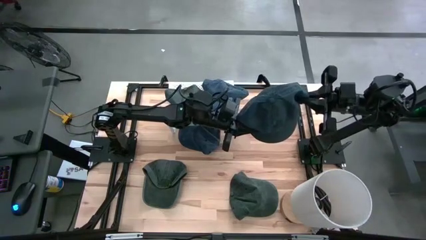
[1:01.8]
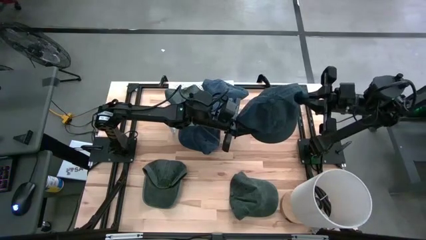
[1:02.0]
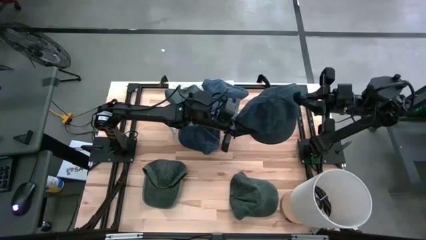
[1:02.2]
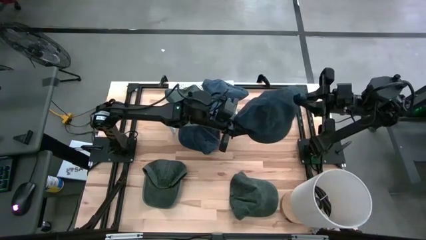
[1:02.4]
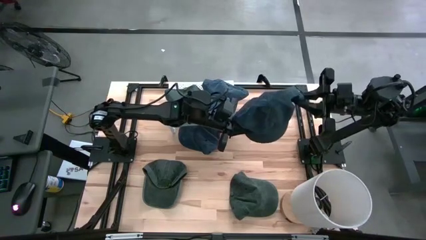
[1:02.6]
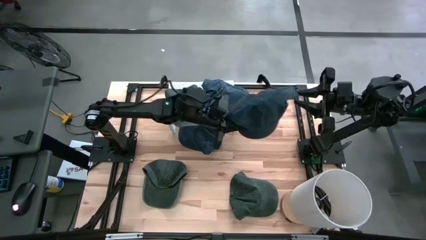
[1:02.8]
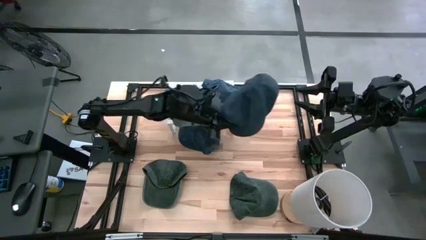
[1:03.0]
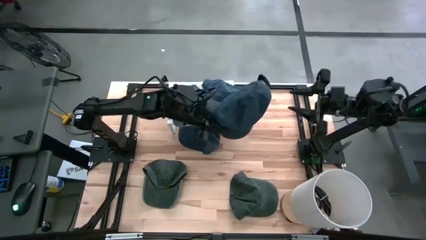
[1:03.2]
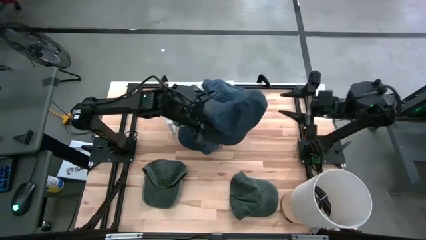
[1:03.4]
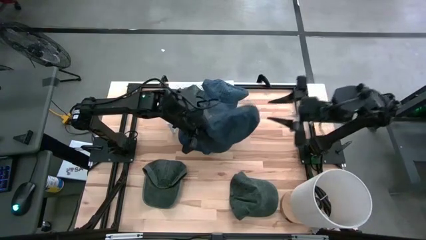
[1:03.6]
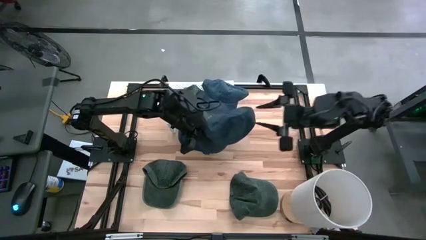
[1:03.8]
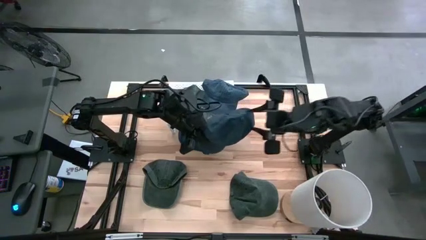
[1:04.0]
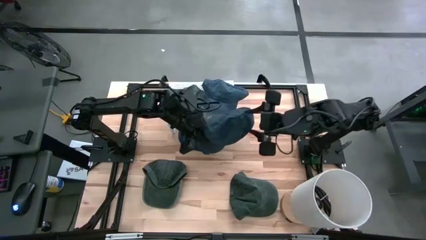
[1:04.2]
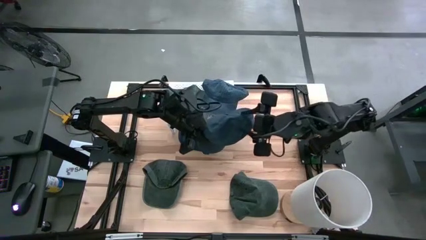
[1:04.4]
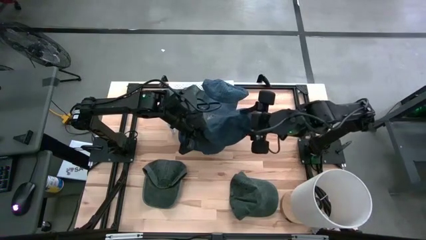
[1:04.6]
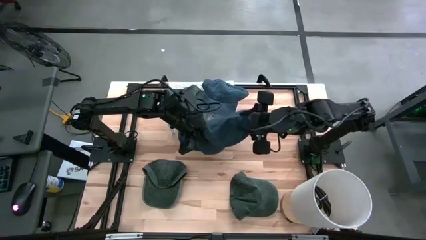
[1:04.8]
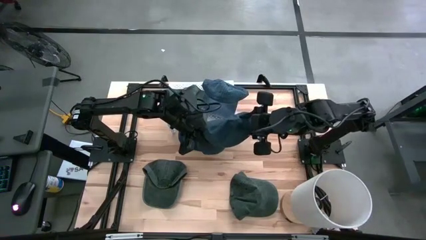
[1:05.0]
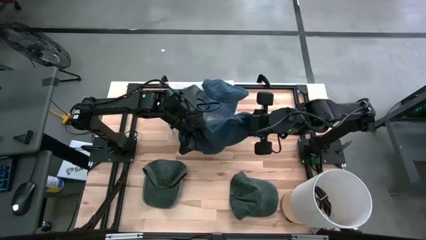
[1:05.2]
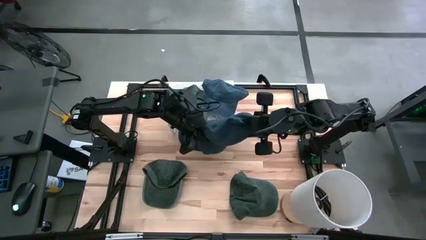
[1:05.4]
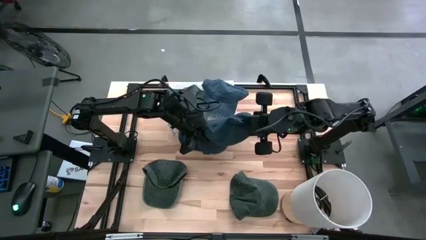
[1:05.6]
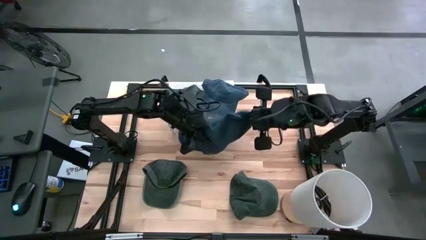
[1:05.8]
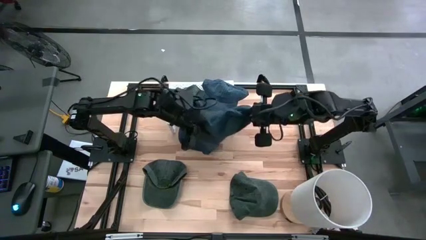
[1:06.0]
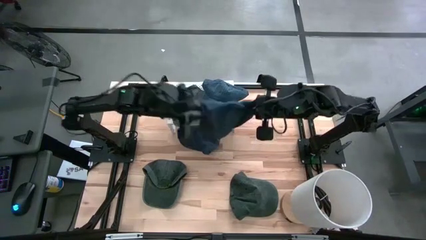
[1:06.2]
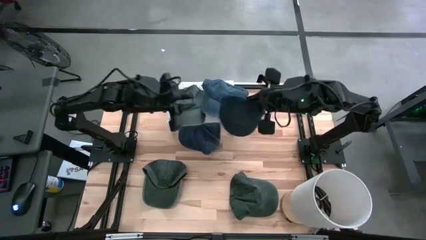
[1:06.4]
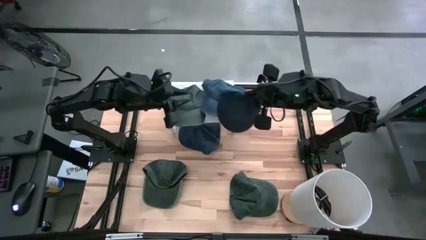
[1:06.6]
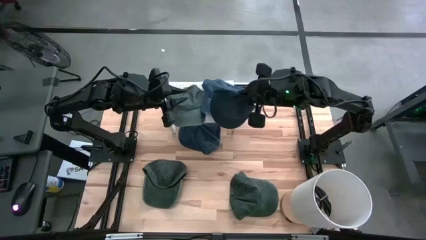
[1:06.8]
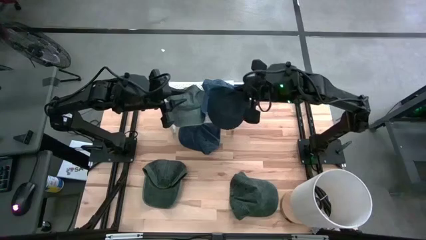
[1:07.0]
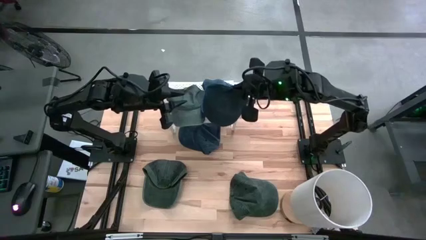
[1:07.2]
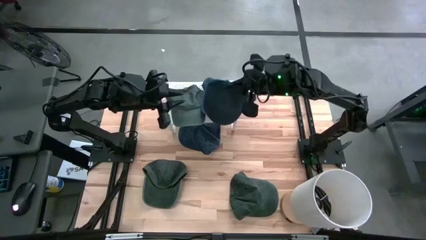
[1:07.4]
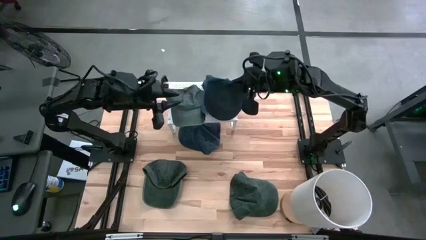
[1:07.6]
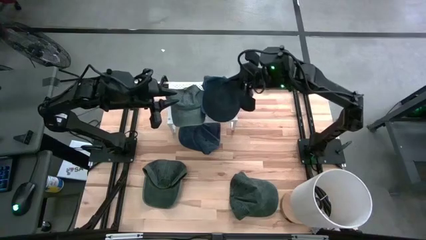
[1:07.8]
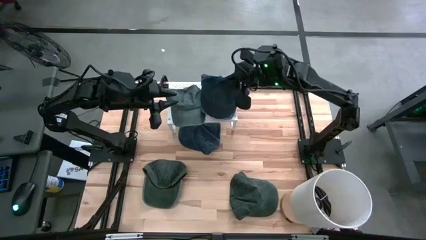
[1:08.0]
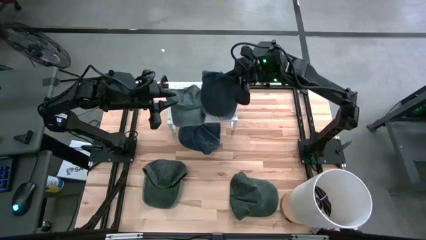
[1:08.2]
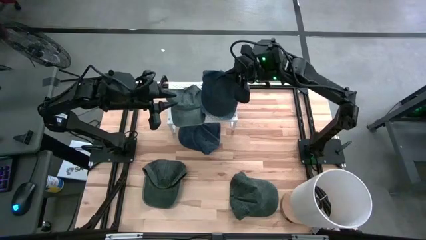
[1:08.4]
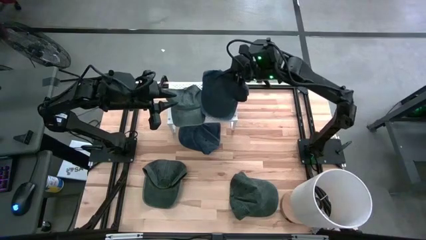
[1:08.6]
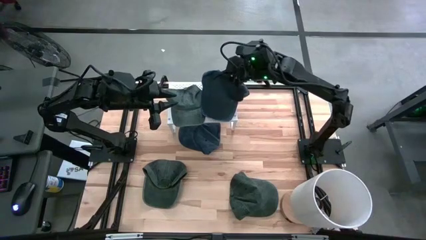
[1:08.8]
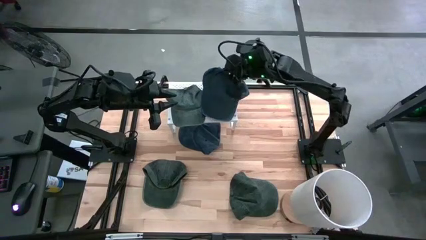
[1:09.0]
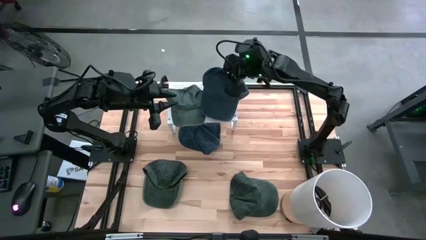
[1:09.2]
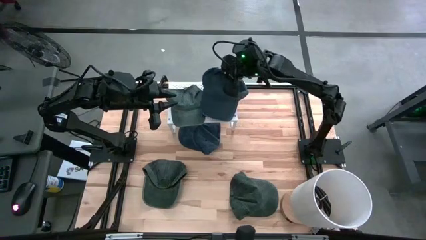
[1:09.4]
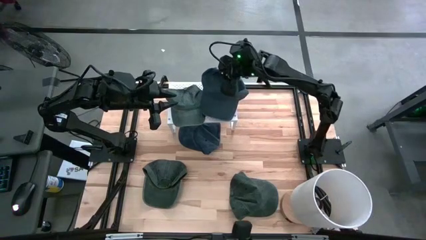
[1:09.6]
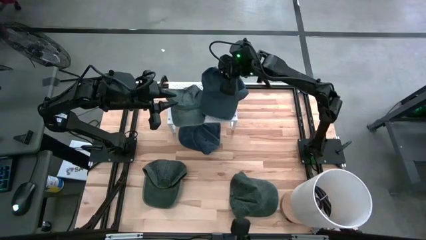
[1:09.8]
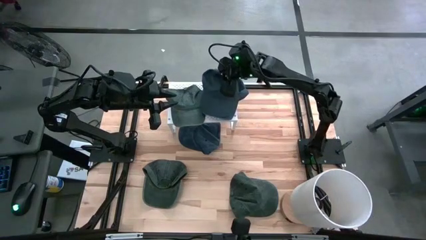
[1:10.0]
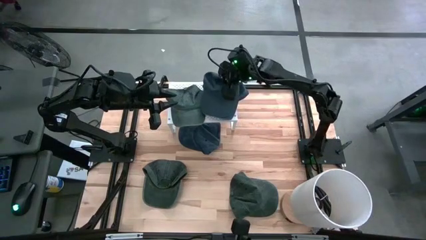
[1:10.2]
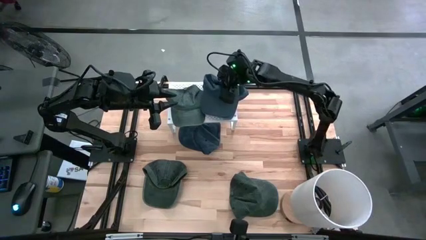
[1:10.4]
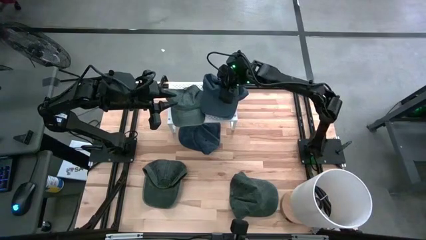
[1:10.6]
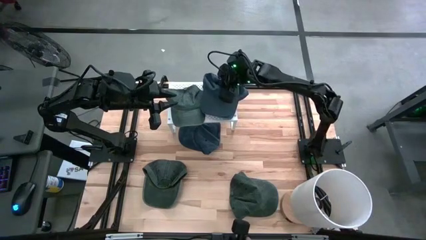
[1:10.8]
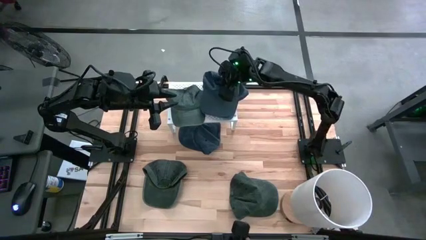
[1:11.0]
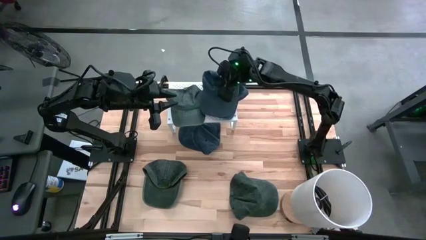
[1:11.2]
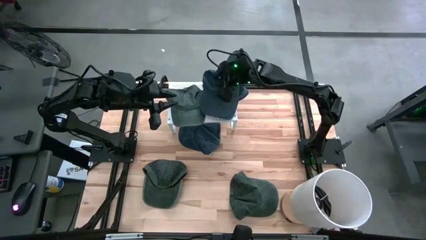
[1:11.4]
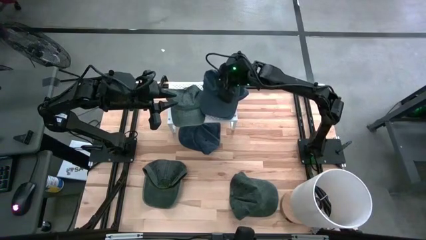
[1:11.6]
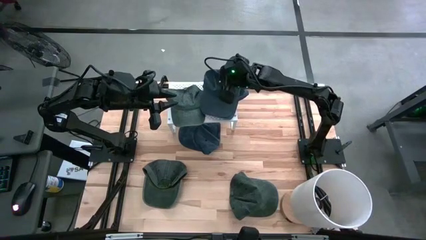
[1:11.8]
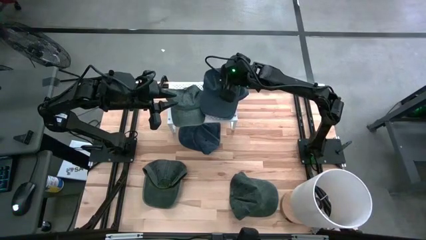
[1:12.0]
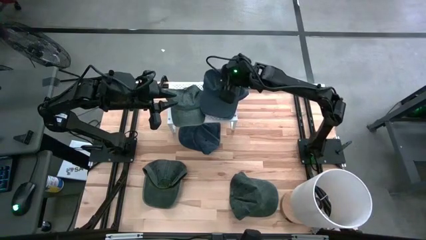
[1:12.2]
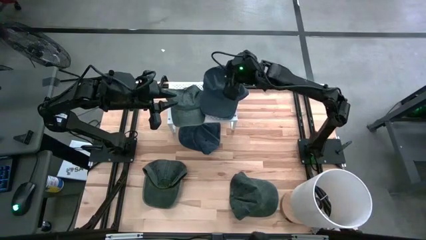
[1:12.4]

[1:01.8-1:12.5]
Task: Pick & Place hat
Stack the right blue cap on the blue cap on the shelf

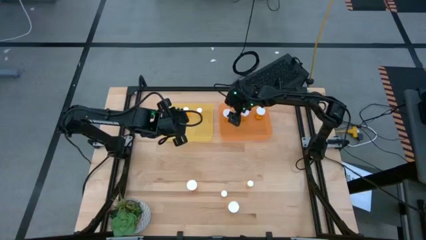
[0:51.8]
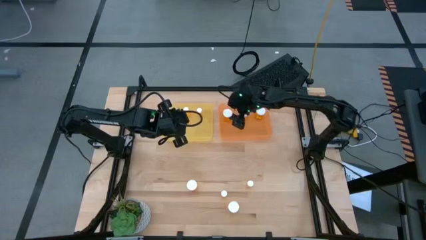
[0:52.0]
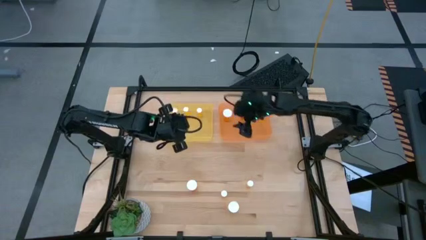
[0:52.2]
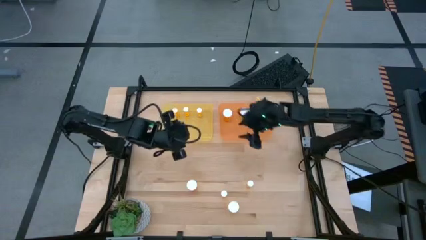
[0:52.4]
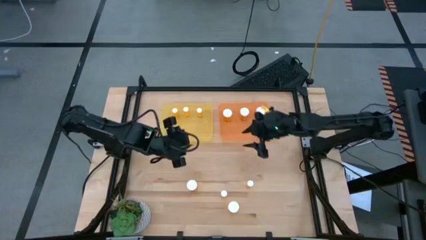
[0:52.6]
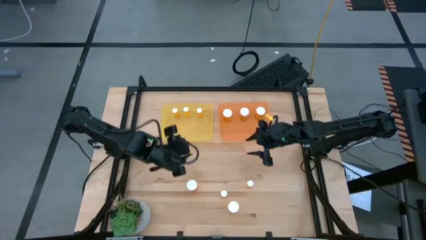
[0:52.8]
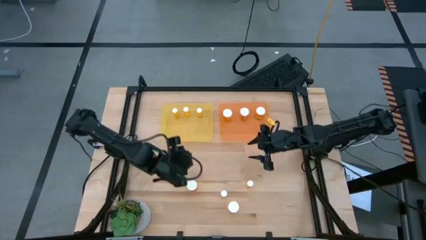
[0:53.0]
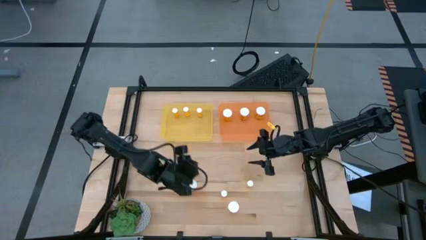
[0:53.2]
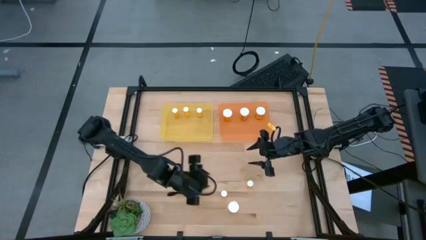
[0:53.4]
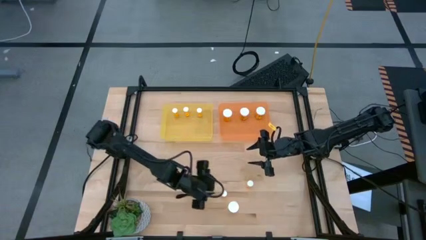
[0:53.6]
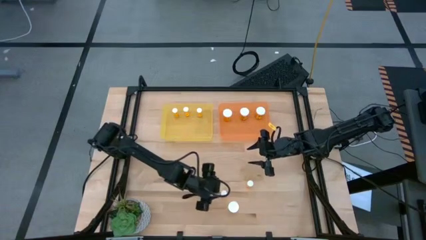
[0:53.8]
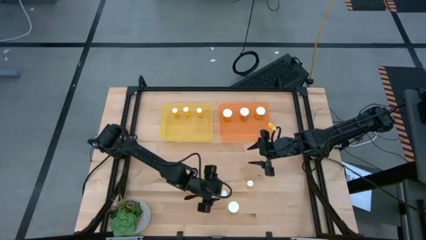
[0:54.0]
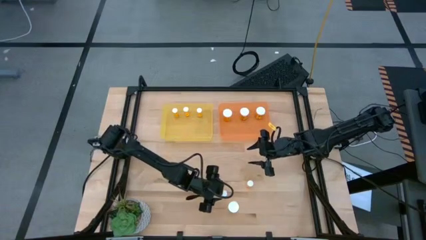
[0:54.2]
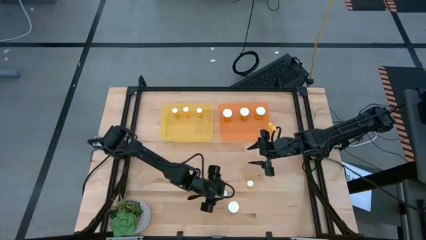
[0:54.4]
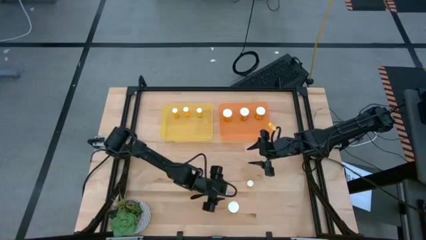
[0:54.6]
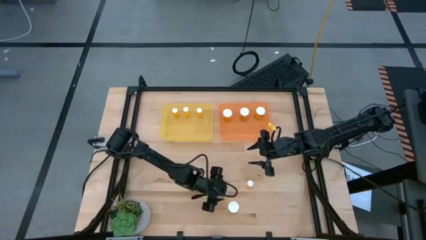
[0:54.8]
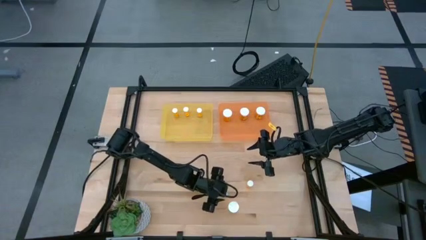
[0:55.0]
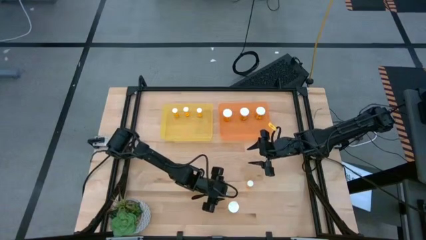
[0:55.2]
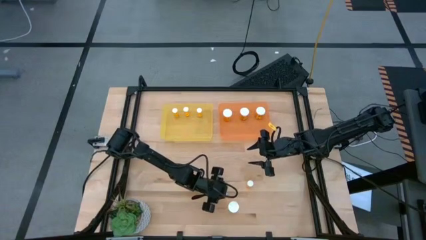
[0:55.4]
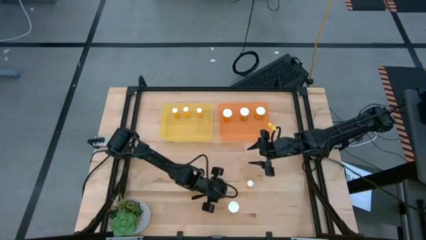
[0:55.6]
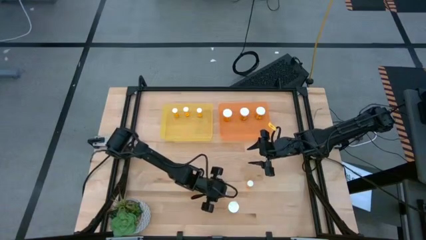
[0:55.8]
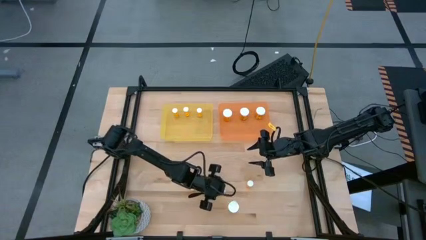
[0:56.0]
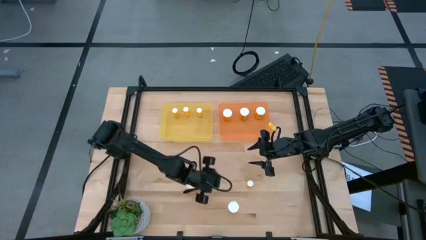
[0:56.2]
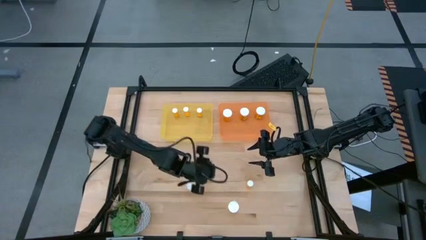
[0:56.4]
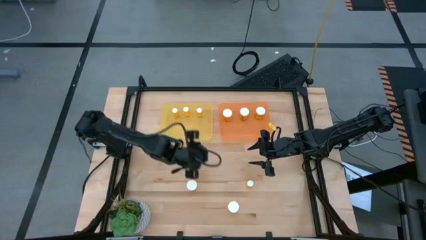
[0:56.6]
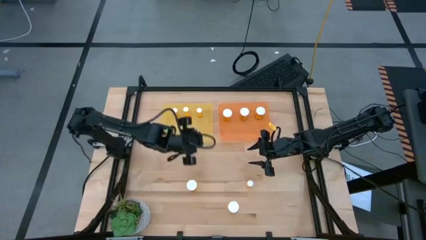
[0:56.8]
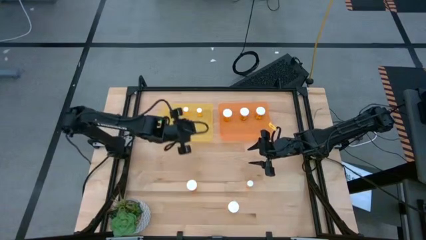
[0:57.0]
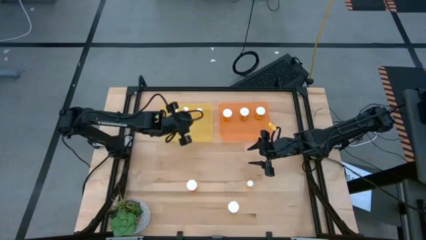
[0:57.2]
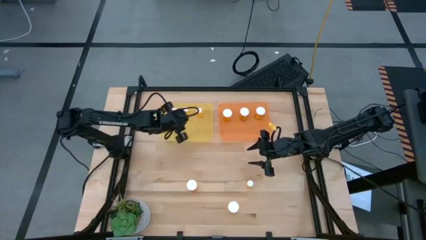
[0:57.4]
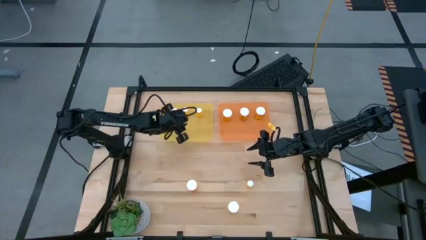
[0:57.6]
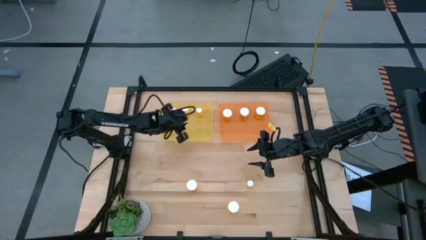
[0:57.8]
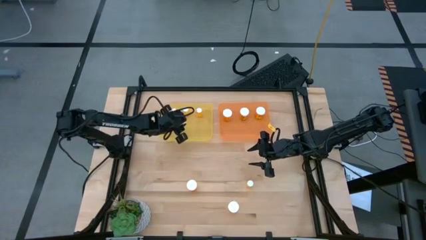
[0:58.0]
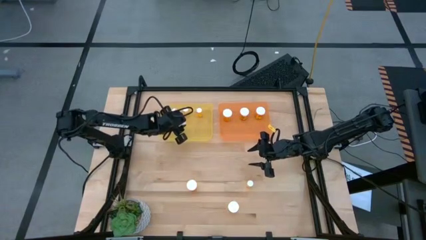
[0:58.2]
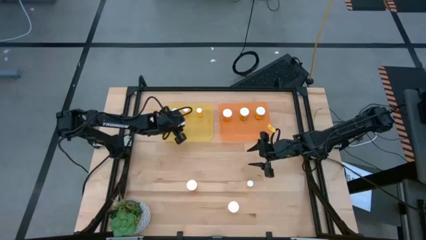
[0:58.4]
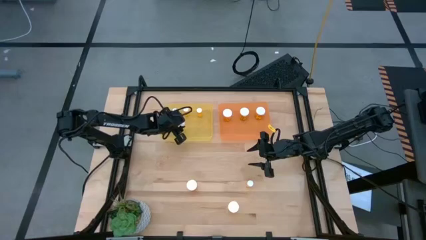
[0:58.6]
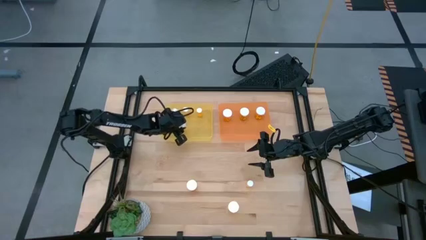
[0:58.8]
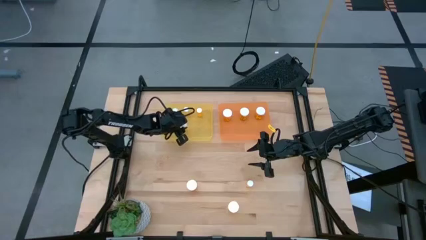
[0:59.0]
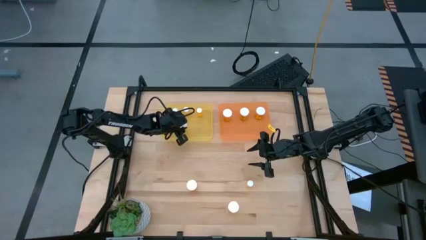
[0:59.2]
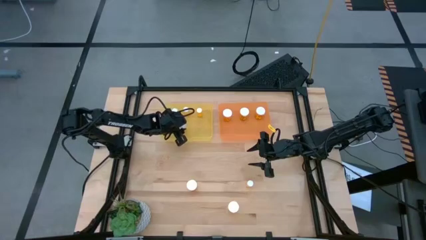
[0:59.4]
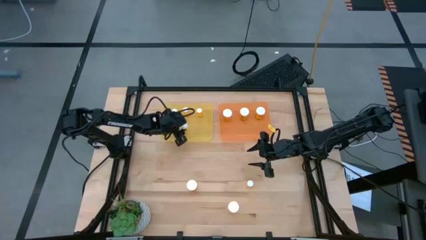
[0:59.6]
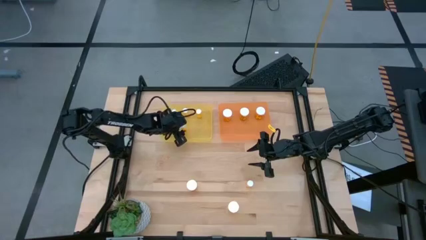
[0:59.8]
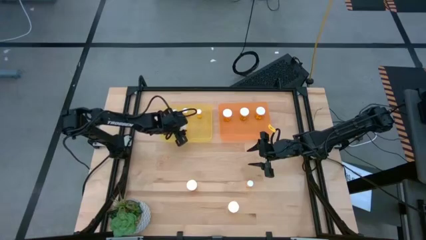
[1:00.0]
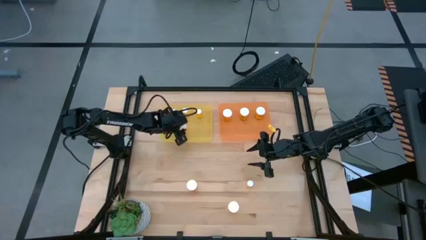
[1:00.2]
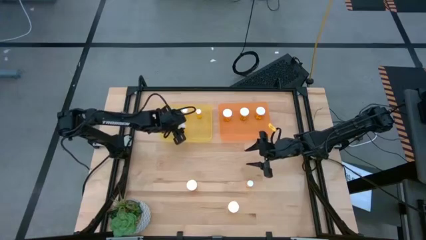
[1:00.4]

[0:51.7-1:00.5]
Task: Pick and place medicine bottles into bin by pill shape (circle, oval)
Put the small orange pill bottle into the yellow bin
